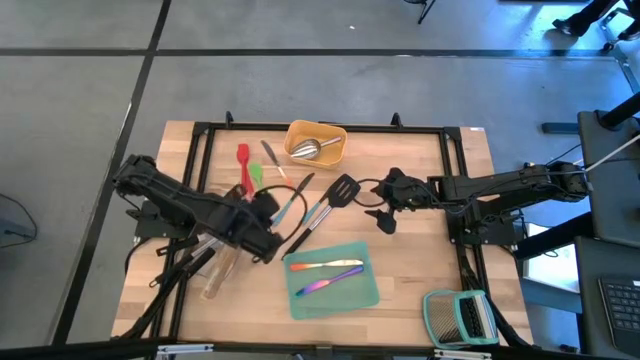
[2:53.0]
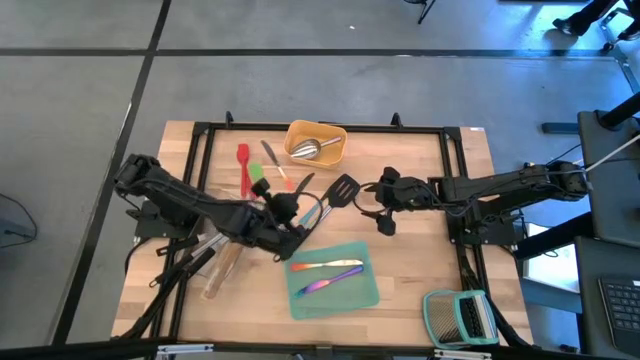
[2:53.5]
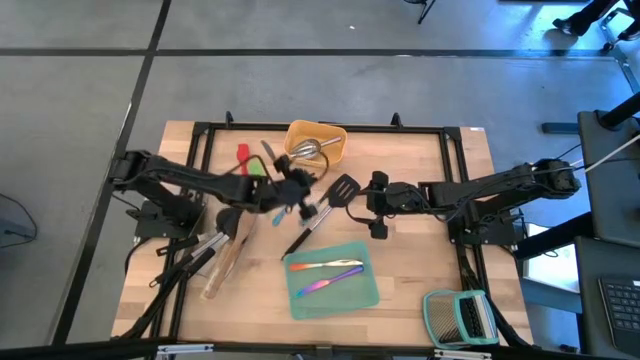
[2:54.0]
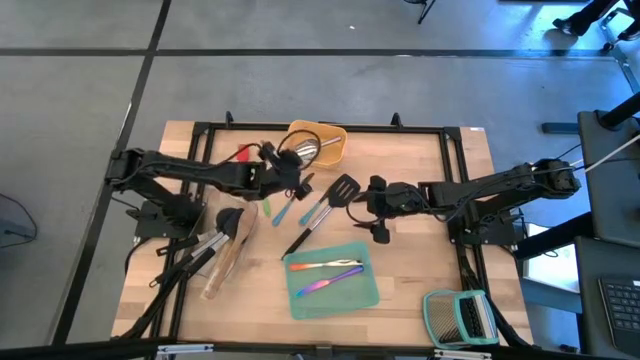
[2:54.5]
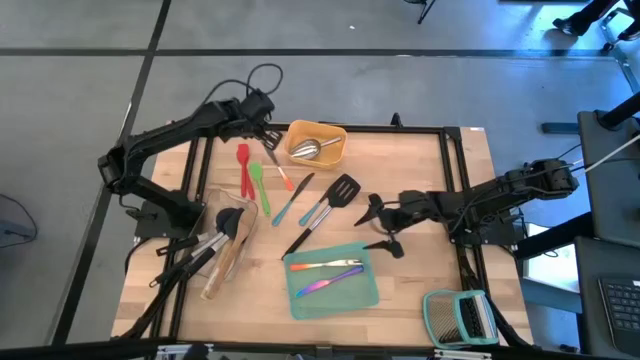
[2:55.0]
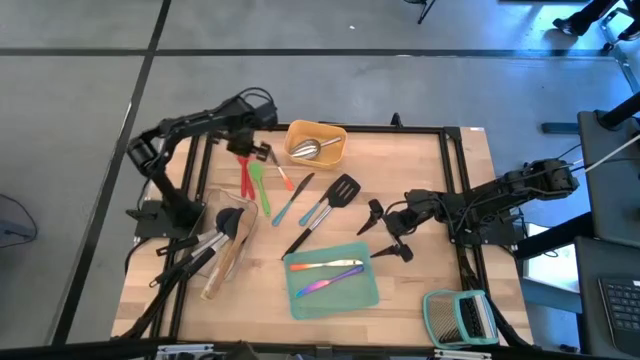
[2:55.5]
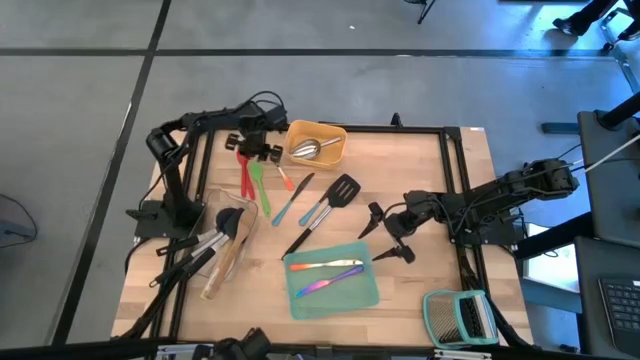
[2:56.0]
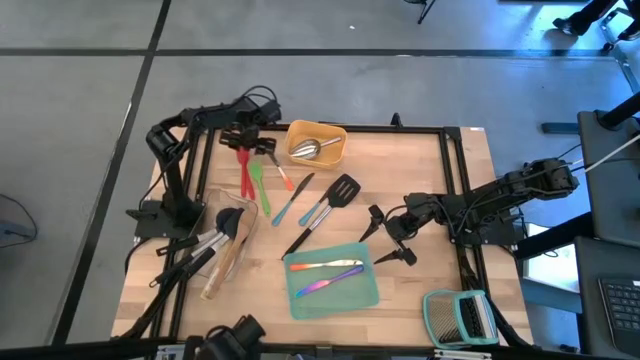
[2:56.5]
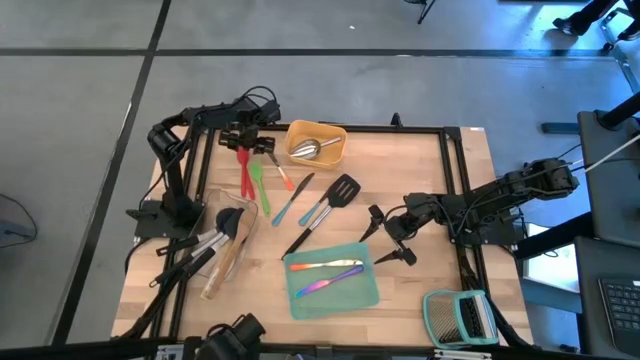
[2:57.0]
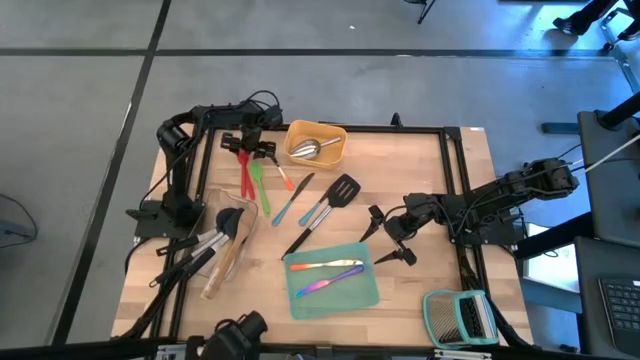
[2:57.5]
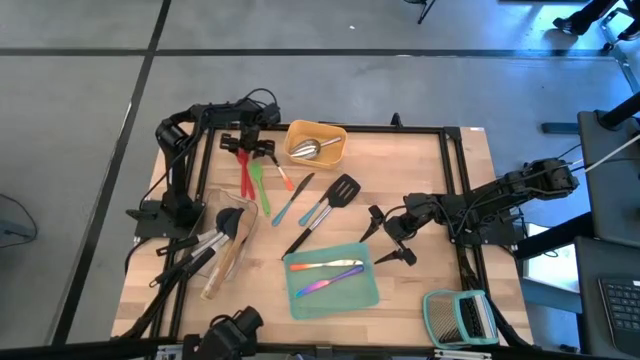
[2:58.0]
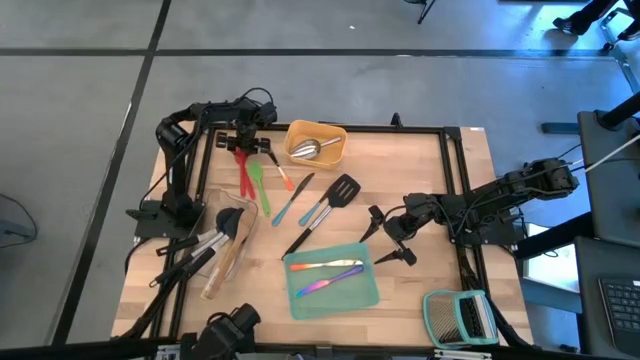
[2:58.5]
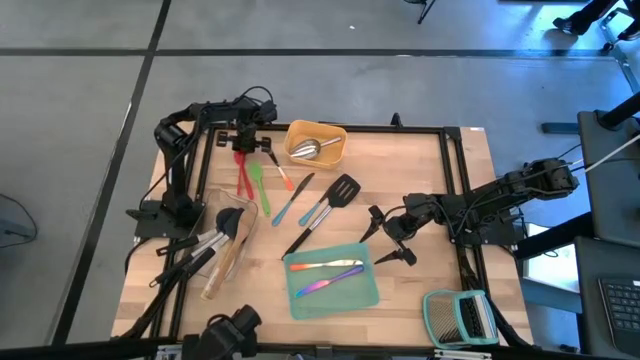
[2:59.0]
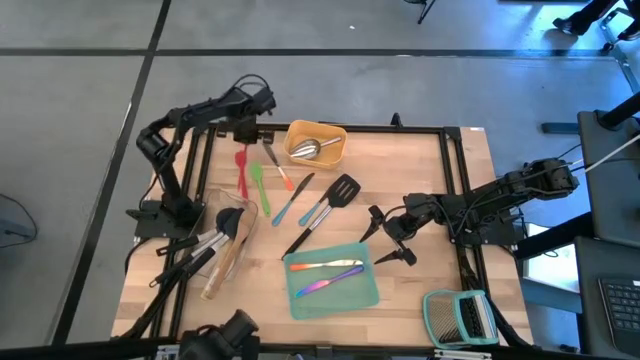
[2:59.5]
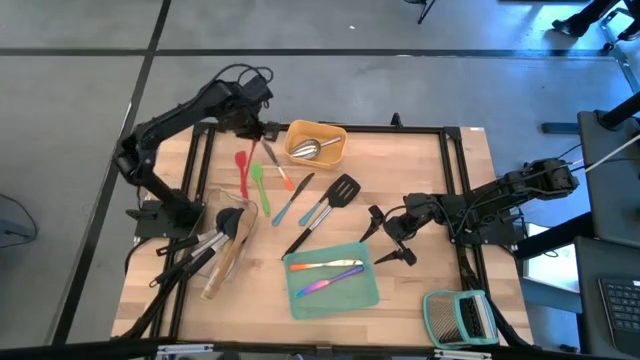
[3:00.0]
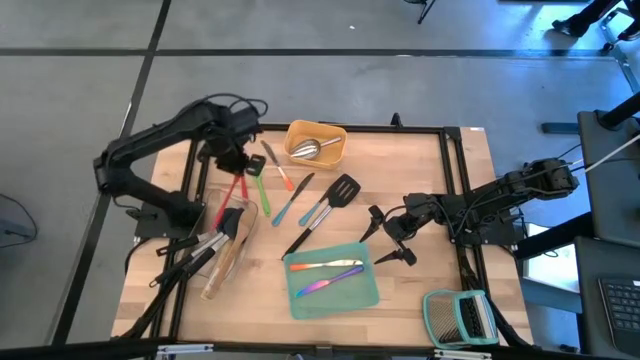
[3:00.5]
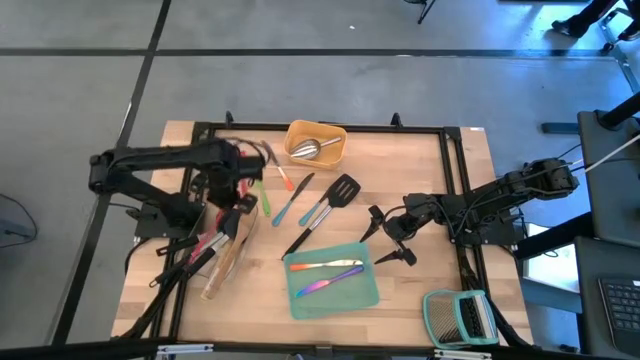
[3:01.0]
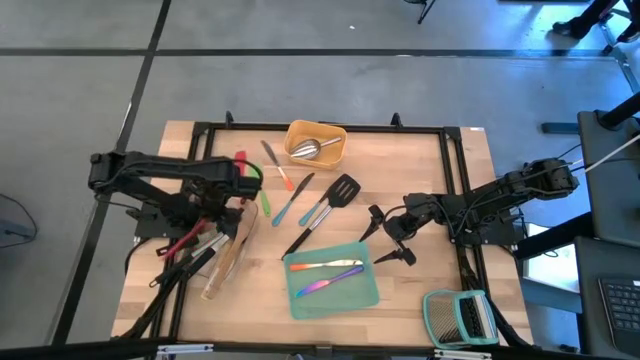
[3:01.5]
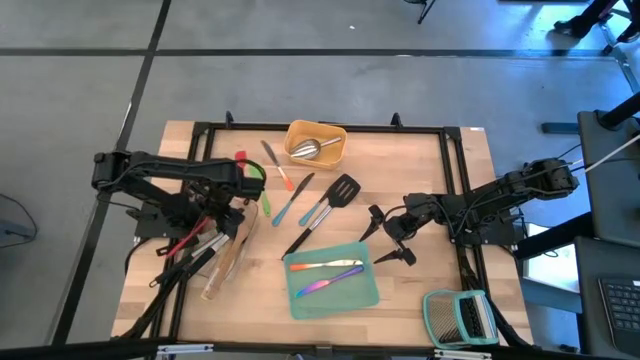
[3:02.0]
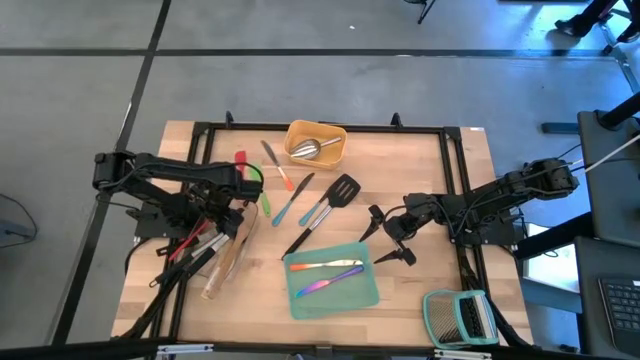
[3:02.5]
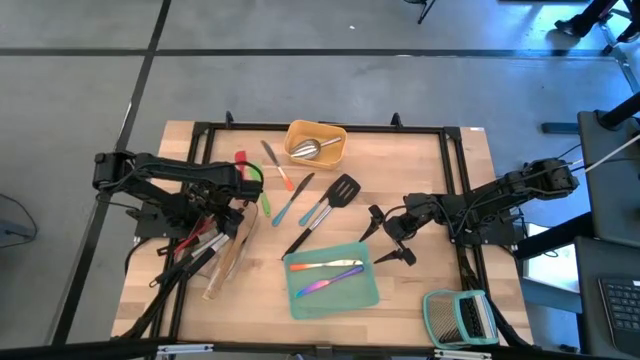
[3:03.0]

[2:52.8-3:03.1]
Task: Pick & Place Kitchen Items
Put the red spatula into the transparent bin

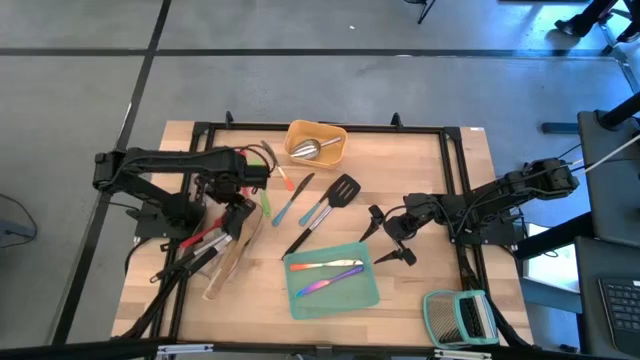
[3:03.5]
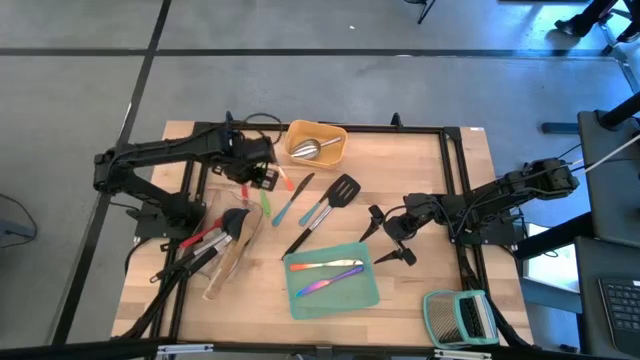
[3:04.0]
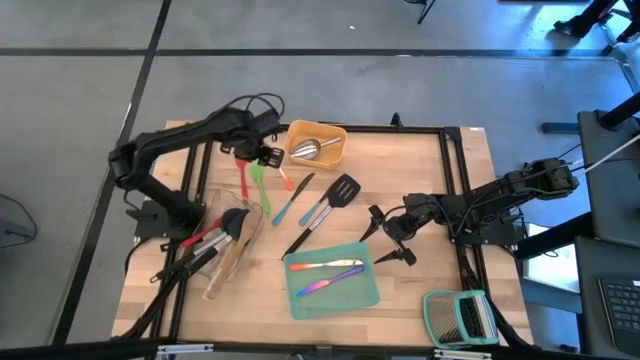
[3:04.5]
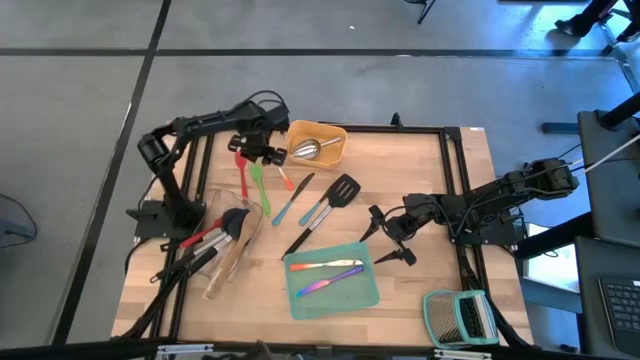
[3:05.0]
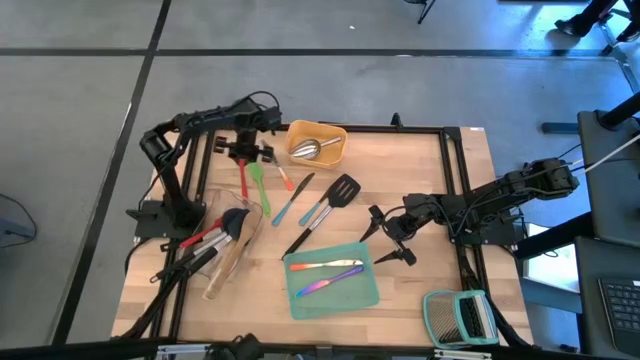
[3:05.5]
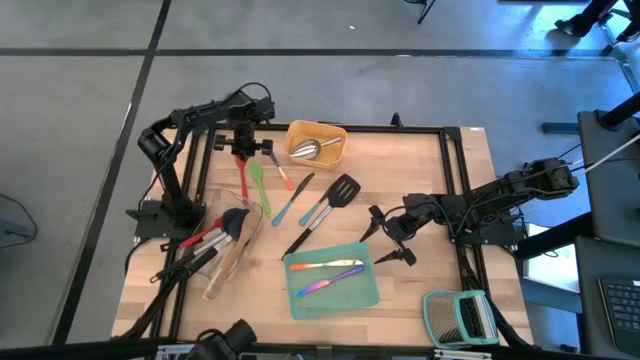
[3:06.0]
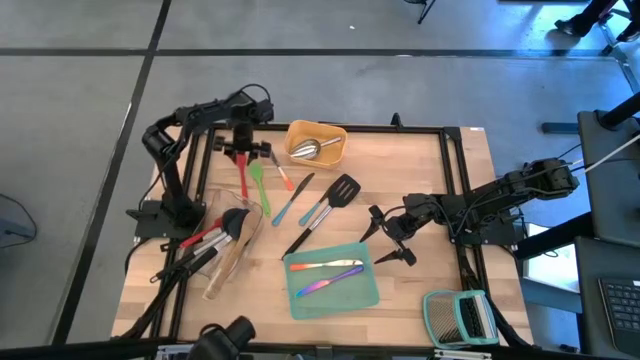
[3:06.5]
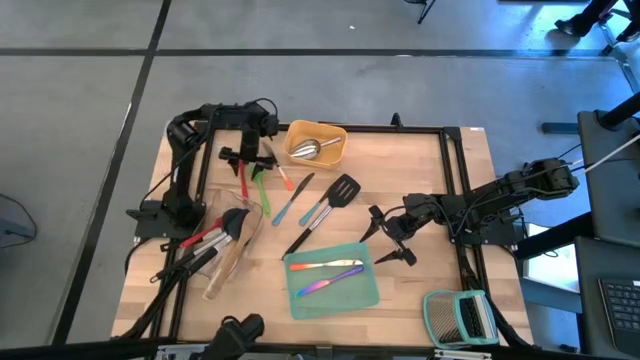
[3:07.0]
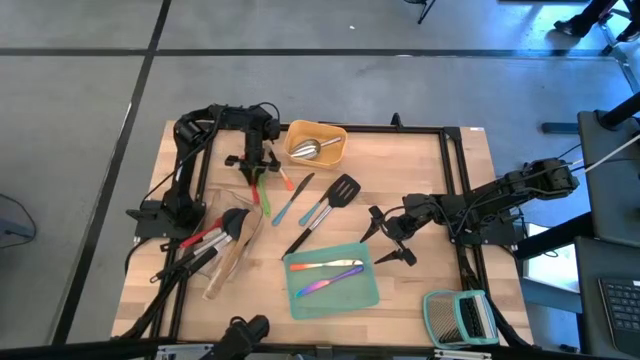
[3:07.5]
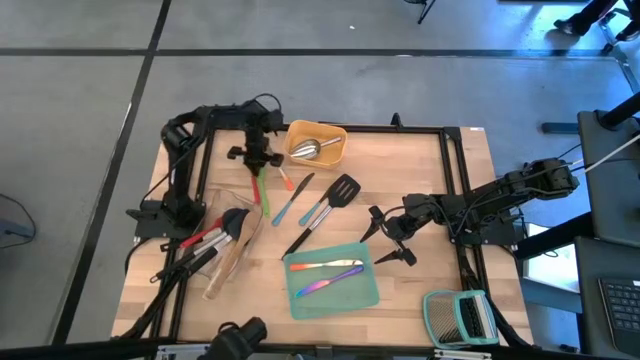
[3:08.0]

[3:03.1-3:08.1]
Put the red spatula into the transparent bin

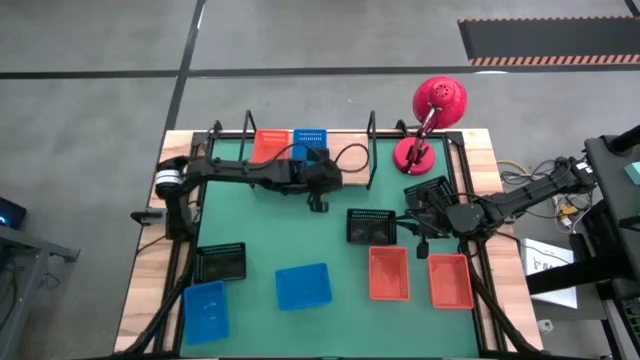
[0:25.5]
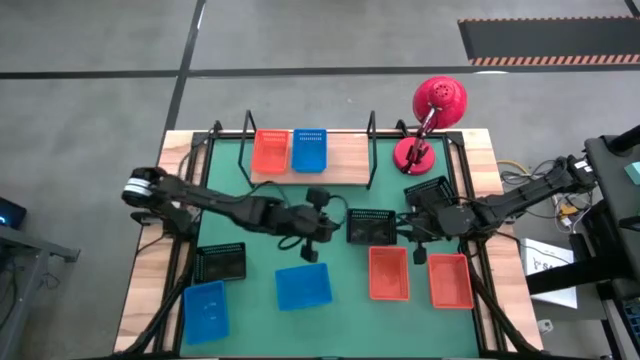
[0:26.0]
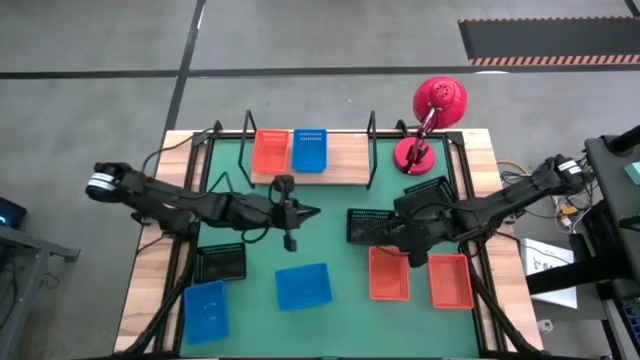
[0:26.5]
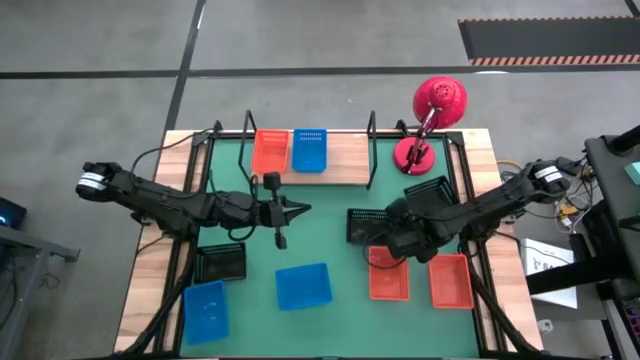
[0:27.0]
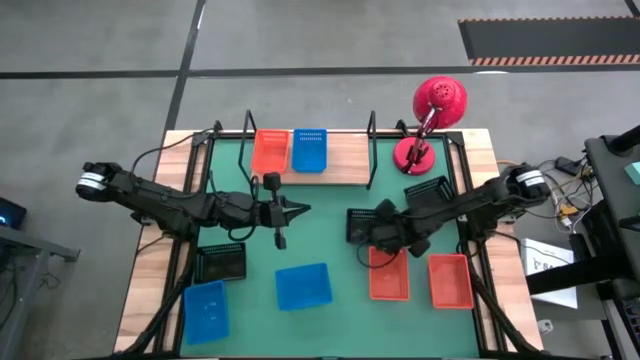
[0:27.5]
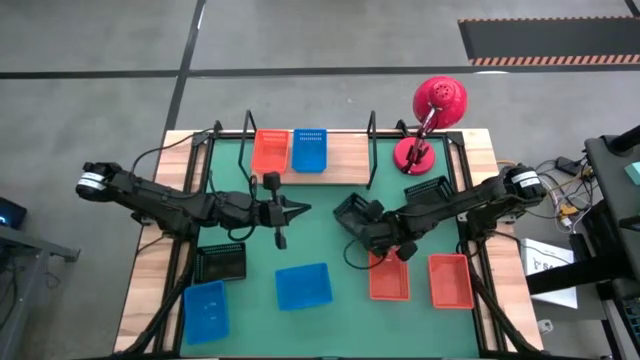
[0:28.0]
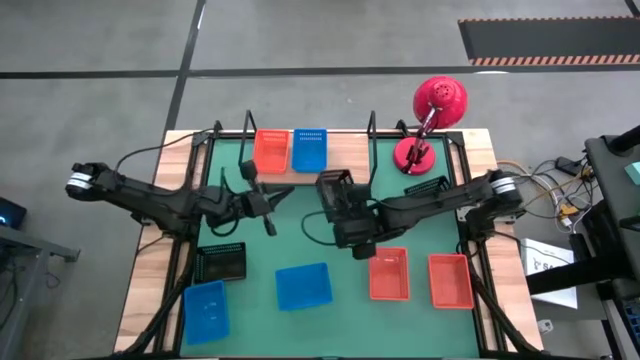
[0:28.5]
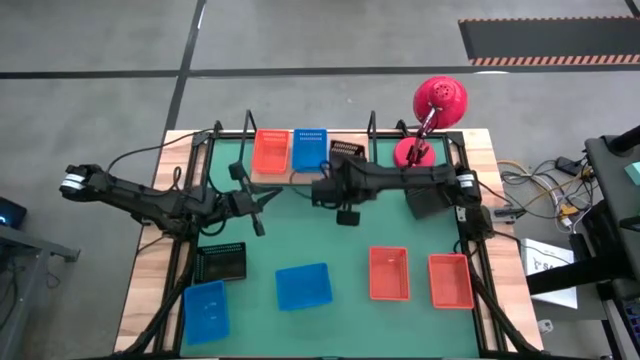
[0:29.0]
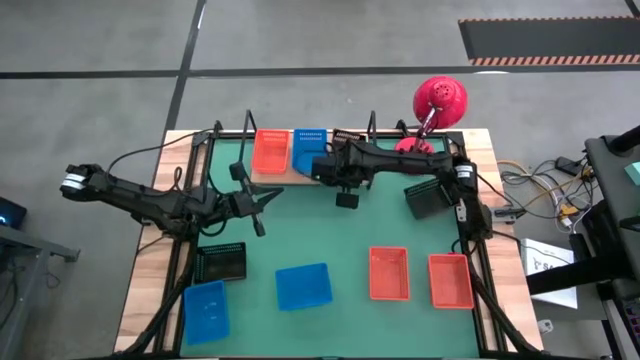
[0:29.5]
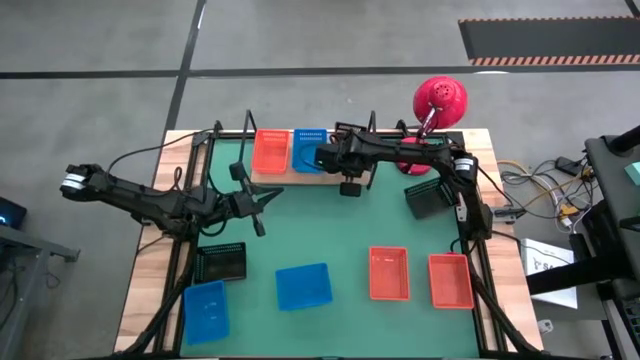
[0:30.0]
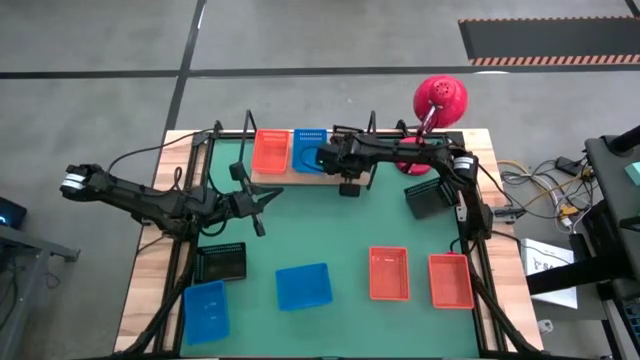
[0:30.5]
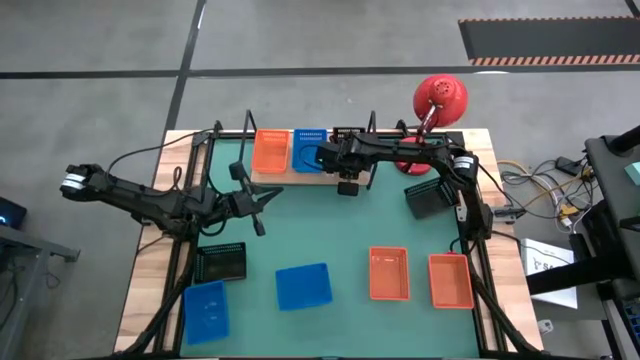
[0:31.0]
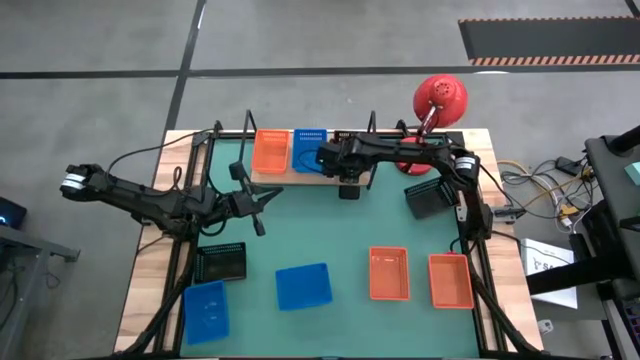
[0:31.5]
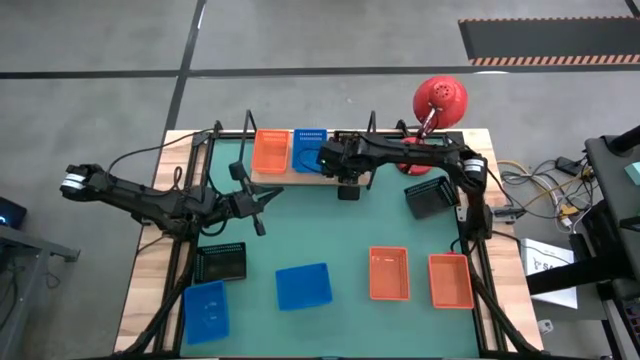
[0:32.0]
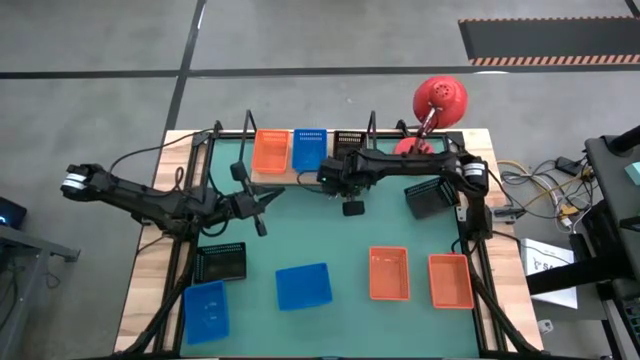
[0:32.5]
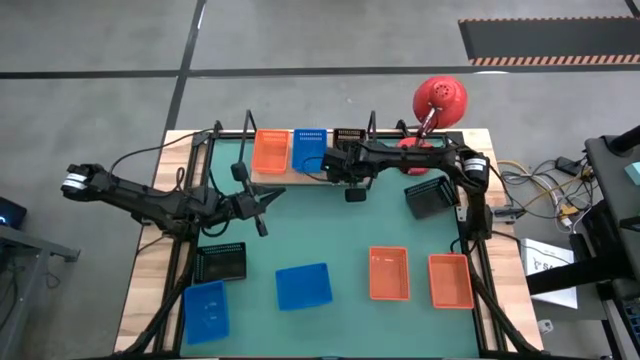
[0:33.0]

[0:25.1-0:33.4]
Task: Stack baskets on shelf by color
Put the middle black basket on the shelf
